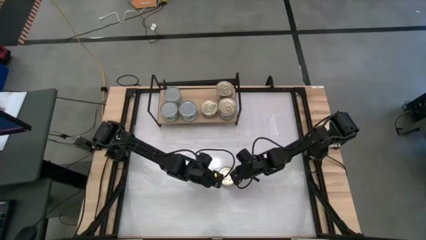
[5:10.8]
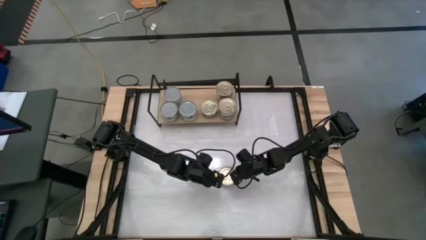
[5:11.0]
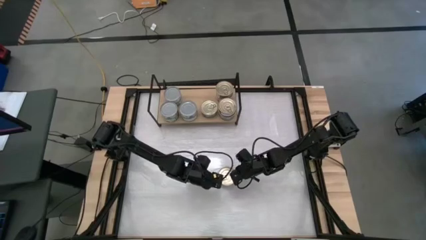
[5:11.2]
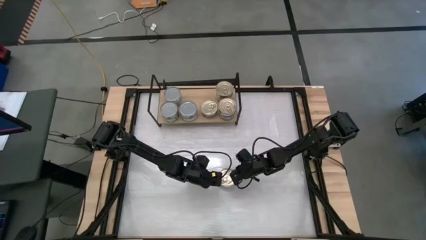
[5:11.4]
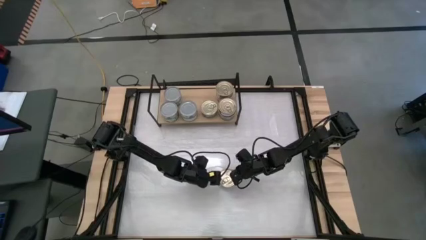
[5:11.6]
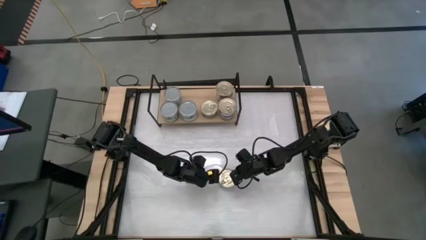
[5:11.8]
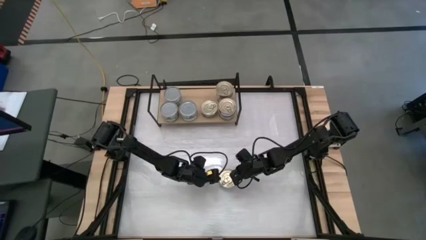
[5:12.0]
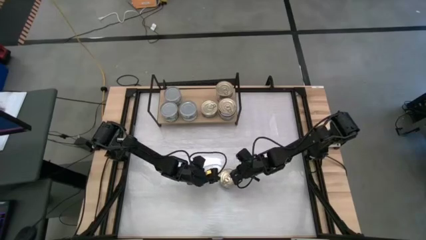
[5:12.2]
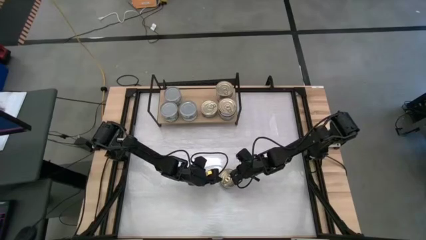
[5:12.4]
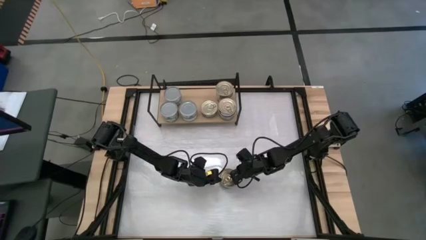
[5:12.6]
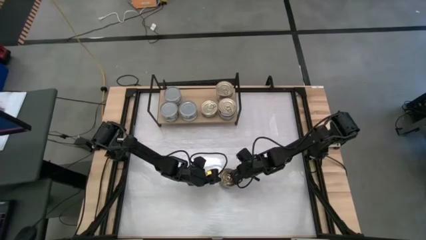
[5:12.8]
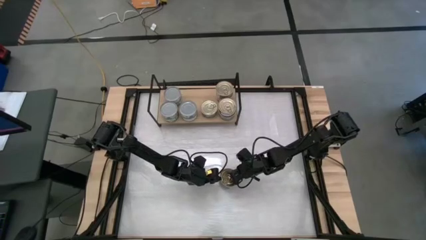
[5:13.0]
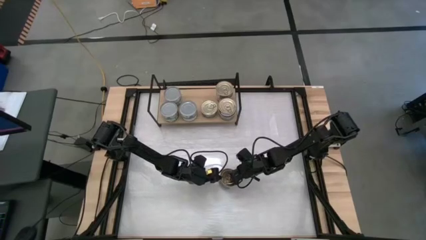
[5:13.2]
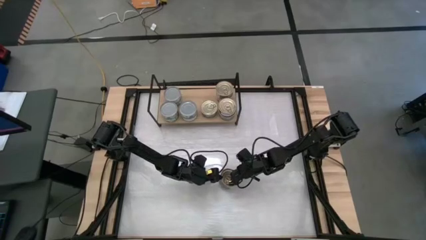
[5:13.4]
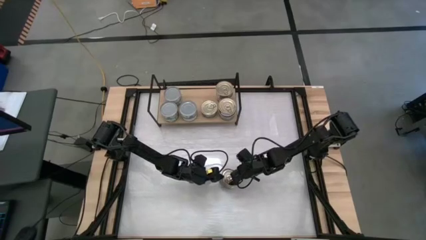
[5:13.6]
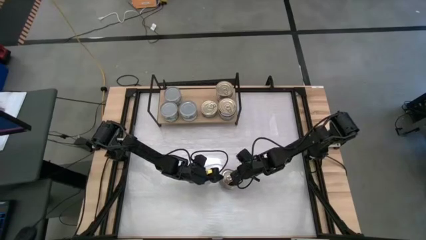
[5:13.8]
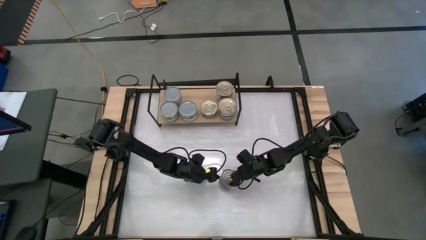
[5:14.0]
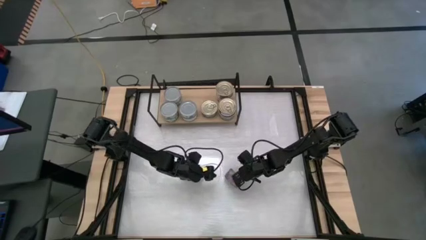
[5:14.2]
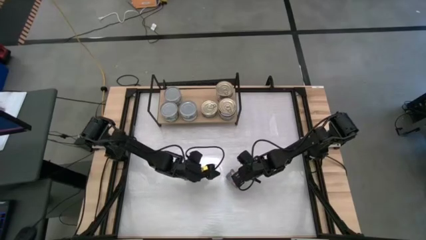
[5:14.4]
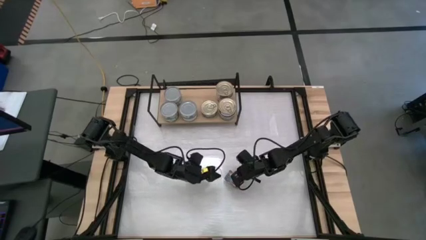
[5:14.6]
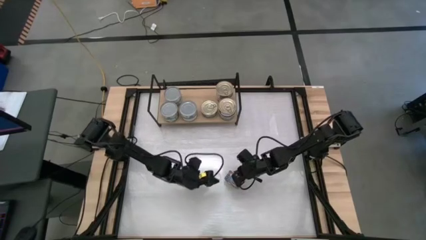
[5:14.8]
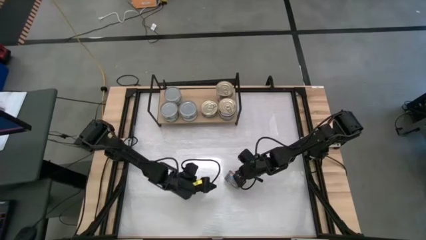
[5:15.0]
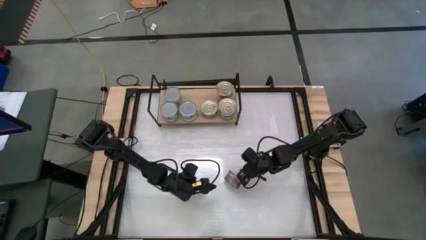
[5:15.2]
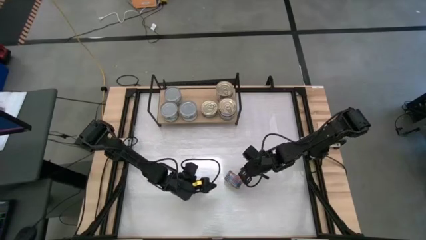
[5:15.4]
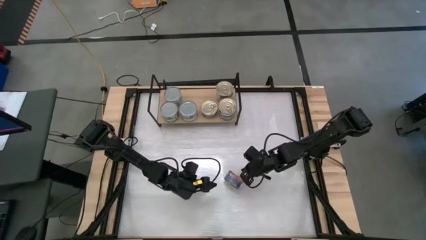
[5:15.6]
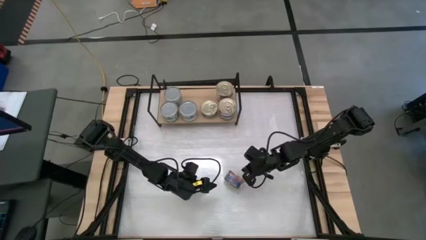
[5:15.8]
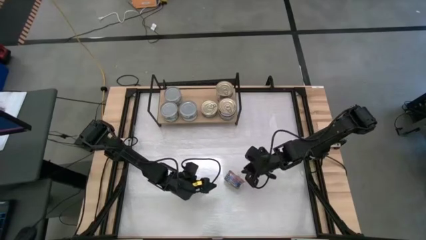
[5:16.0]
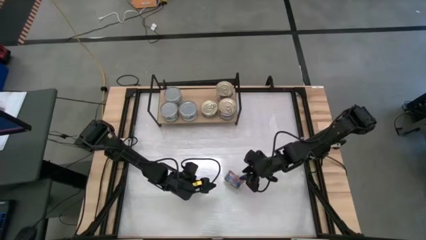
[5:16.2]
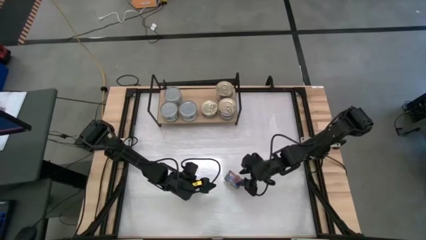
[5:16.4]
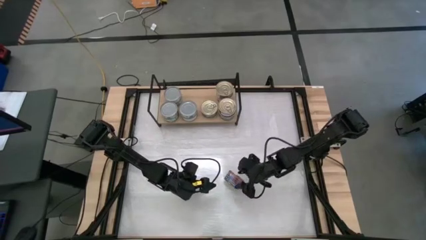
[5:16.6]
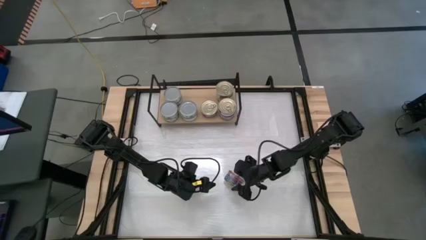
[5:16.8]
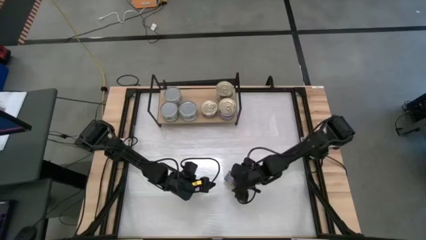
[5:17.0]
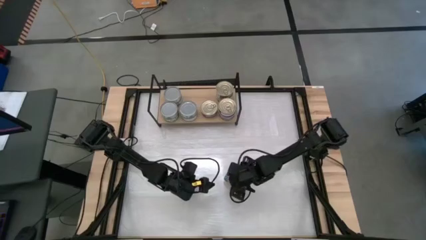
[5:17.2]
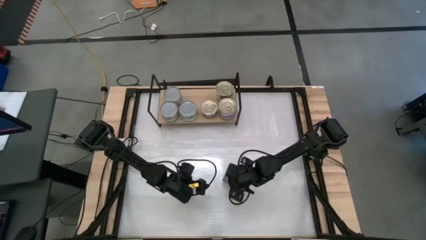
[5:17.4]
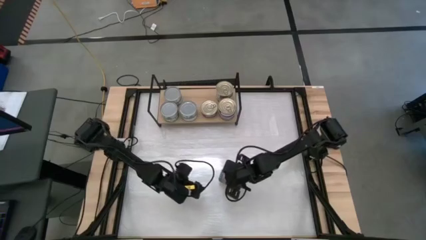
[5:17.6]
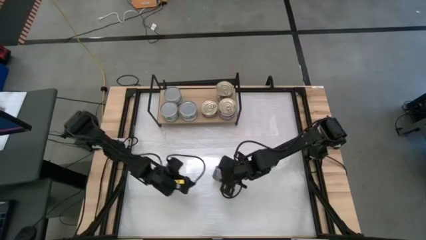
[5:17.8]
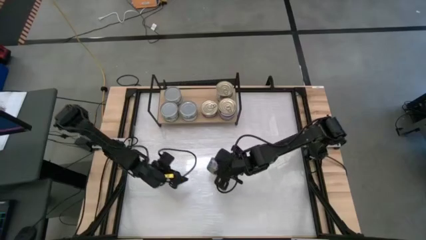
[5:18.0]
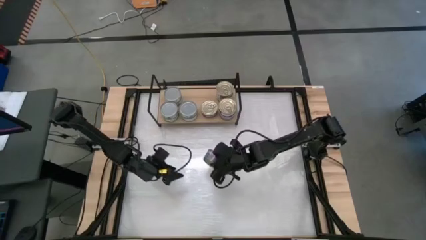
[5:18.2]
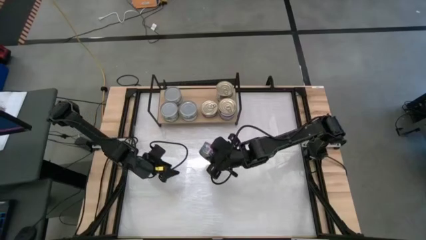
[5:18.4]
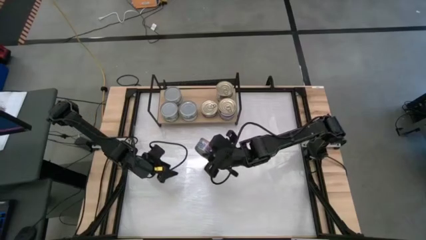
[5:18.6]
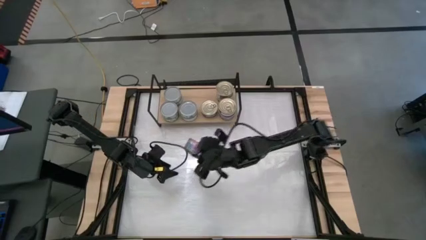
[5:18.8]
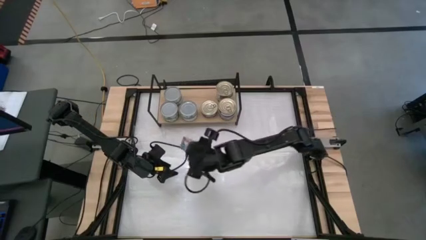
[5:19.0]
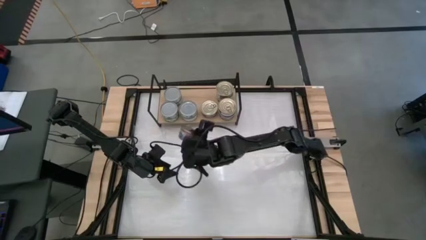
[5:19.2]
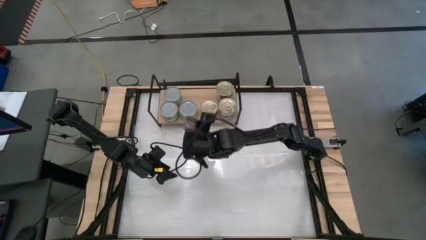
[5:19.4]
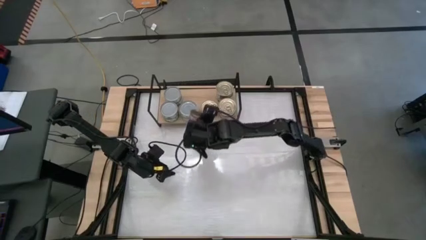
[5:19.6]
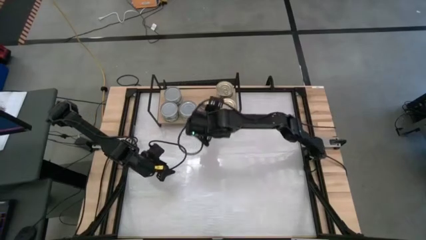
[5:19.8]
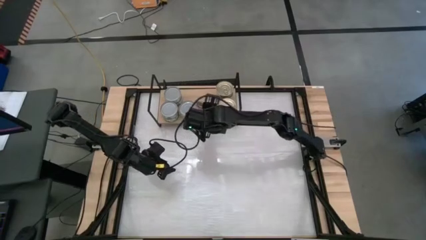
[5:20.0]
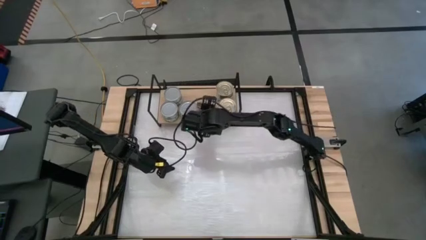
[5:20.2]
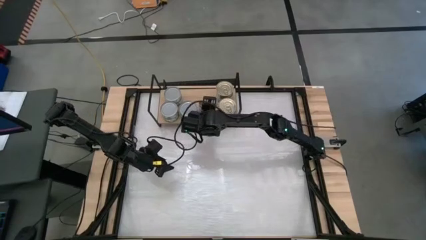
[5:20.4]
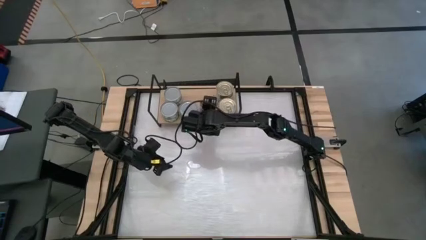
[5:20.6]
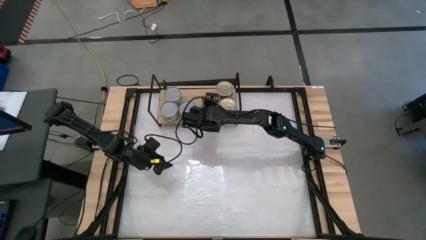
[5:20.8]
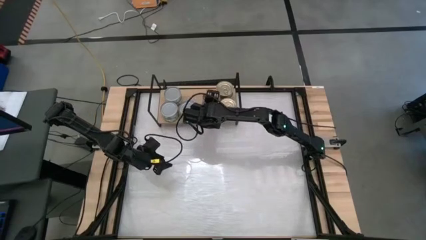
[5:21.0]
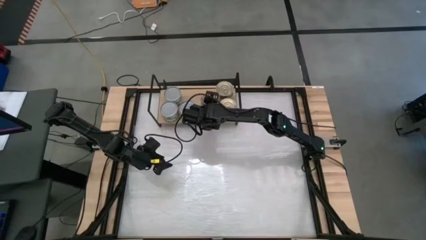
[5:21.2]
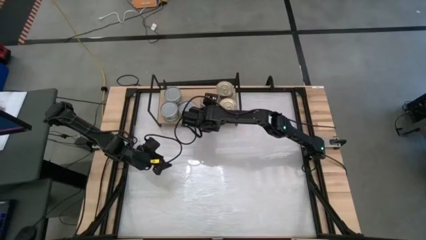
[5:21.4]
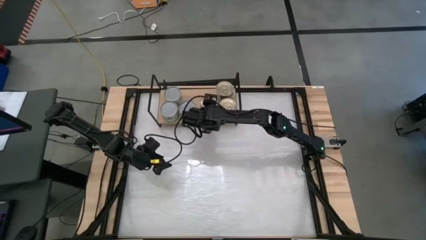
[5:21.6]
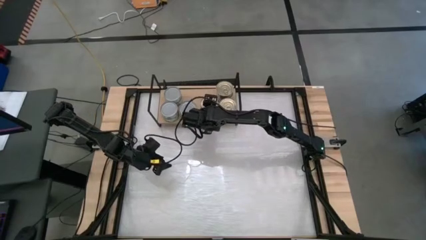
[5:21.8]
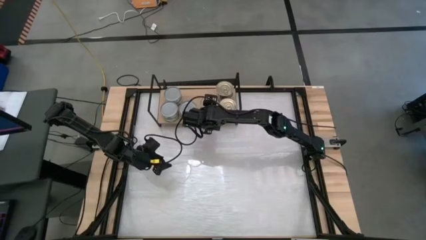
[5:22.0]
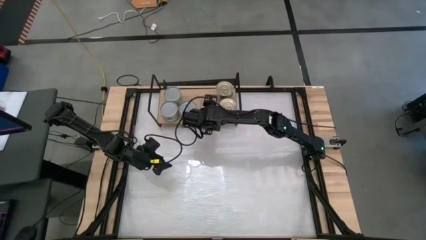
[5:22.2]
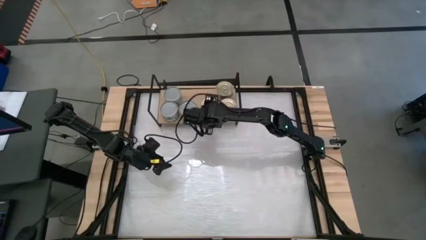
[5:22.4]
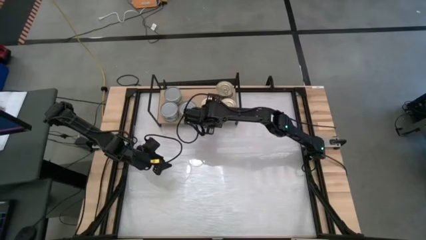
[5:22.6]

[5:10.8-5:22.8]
Task: Stack canned seafood by type on shelf
Stack the blue tuna can on top of the blue tuna can on the shelf

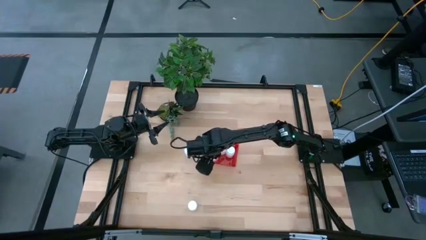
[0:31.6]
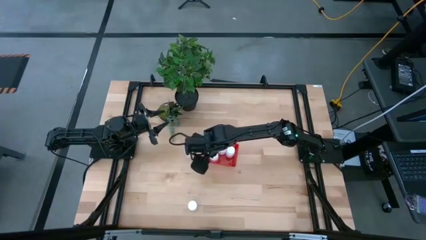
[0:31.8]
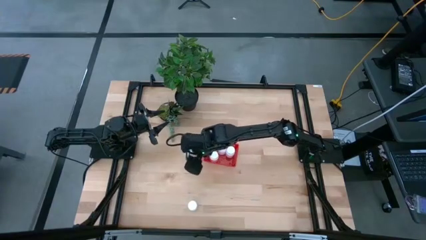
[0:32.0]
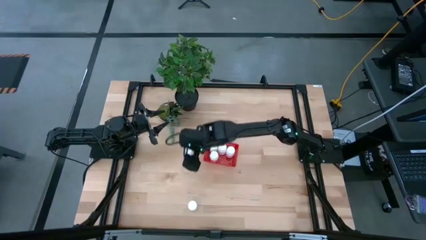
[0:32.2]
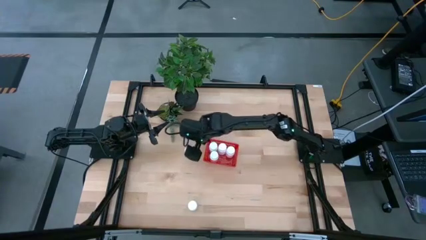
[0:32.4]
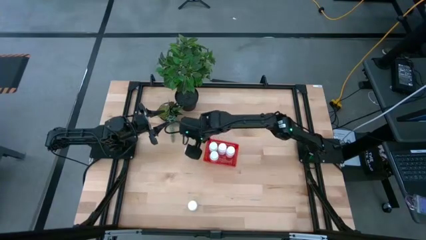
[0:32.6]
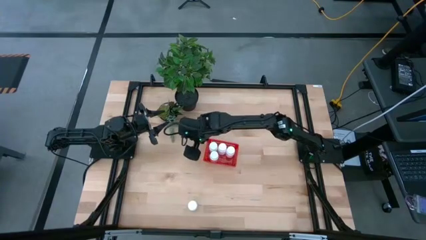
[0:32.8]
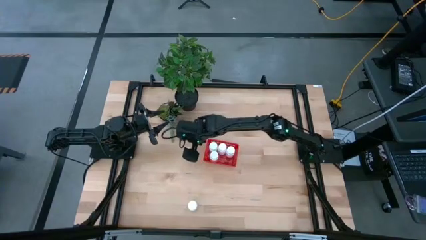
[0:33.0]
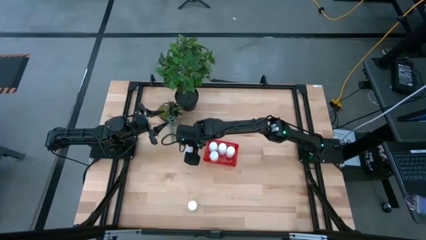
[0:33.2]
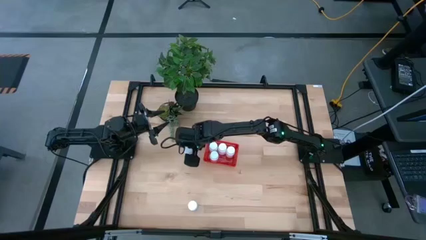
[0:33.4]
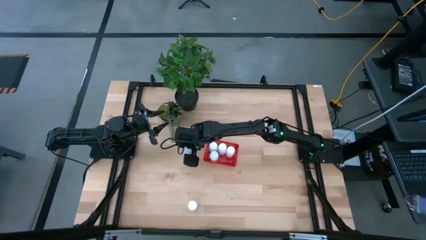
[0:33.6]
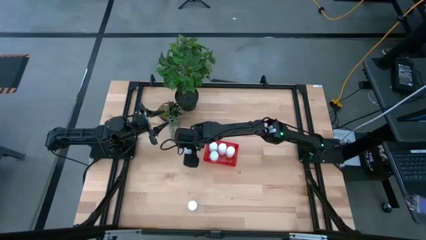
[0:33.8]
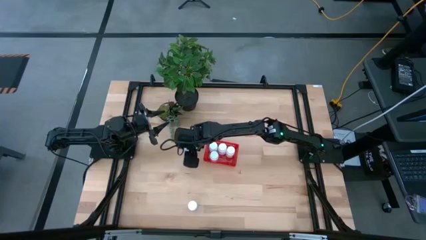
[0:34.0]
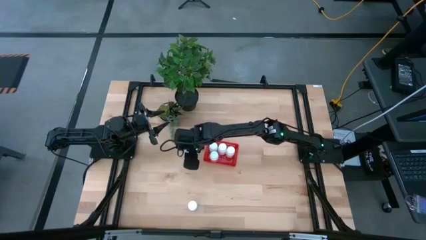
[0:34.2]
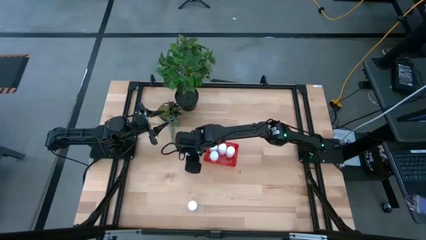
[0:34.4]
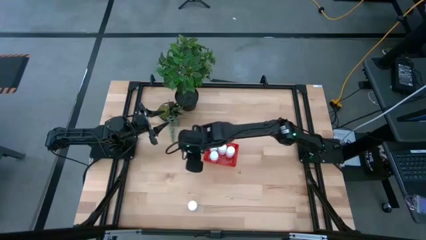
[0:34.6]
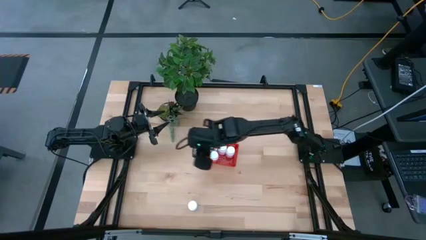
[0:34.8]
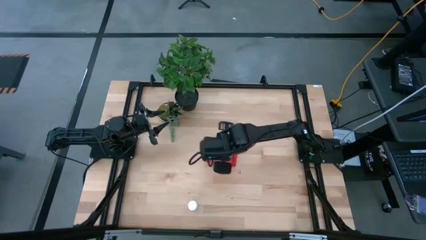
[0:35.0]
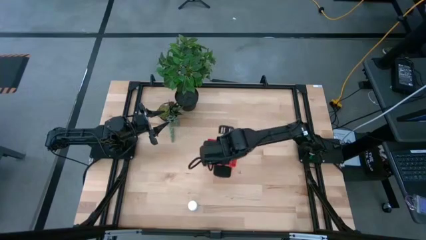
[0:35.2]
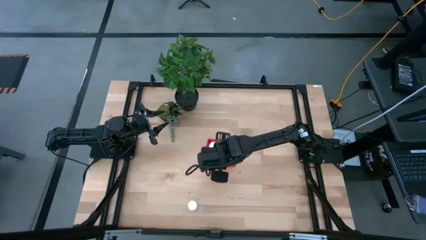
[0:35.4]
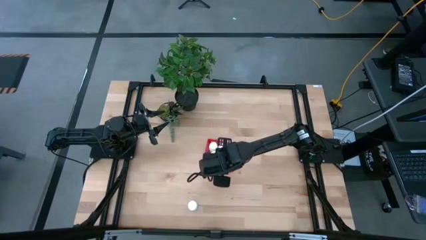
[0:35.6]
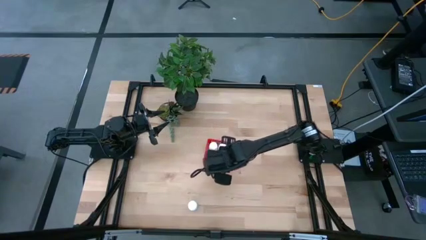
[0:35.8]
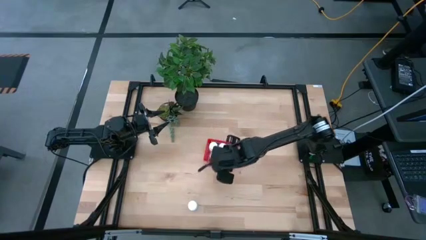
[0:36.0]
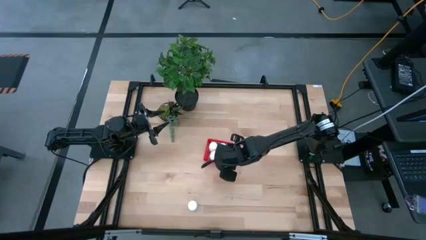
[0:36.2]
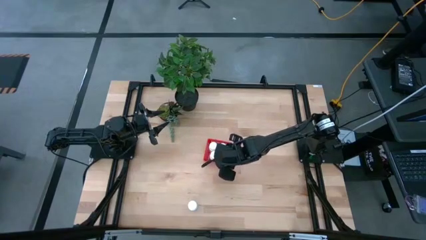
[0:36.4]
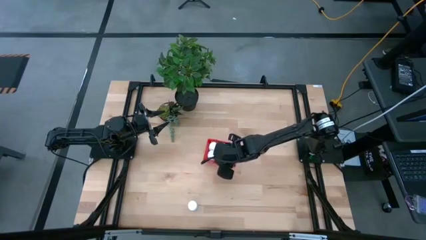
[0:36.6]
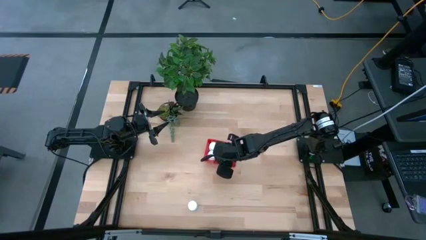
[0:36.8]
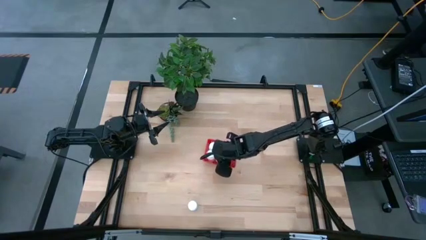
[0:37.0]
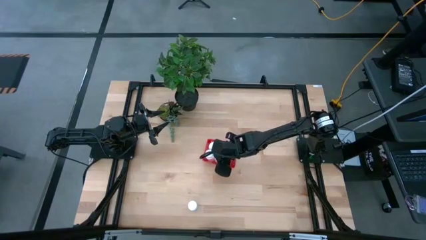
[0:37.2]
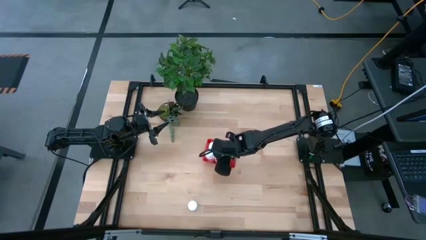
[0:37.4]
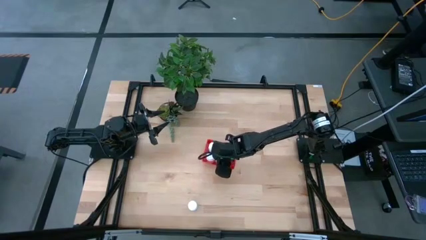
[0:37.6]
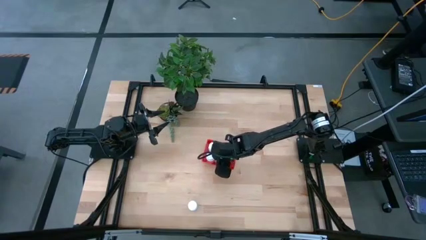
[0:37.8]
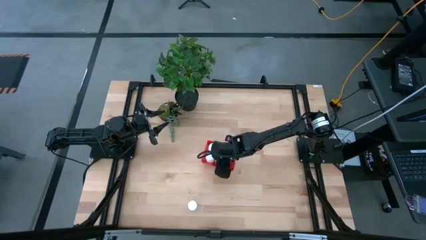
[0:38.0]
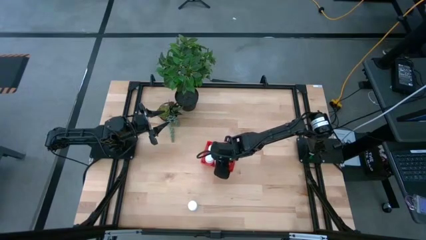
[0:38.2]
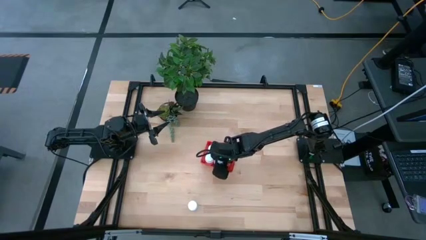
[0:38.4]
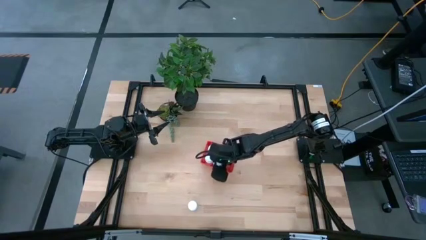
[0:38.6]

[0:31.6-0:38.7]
Task: Pick and place pill bottles into a basket
Put the white pill bottle into the red bin
